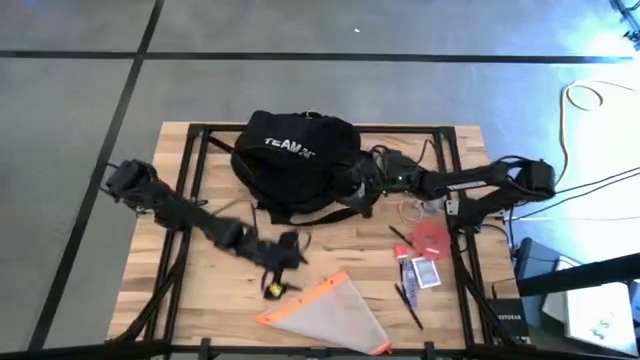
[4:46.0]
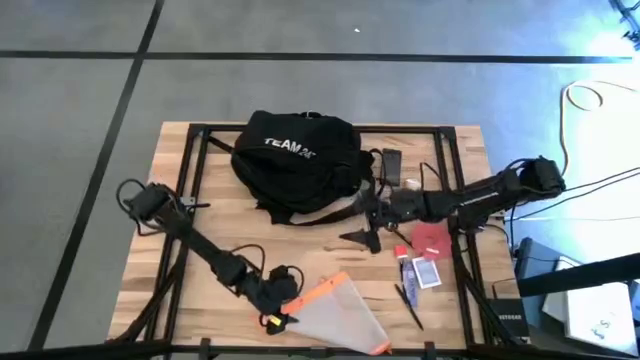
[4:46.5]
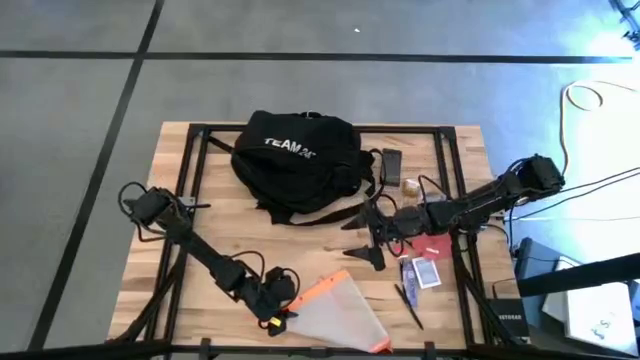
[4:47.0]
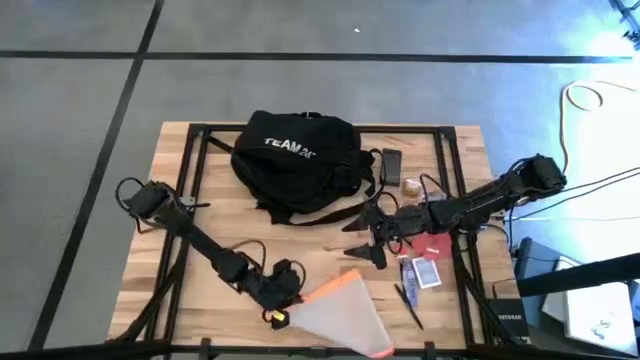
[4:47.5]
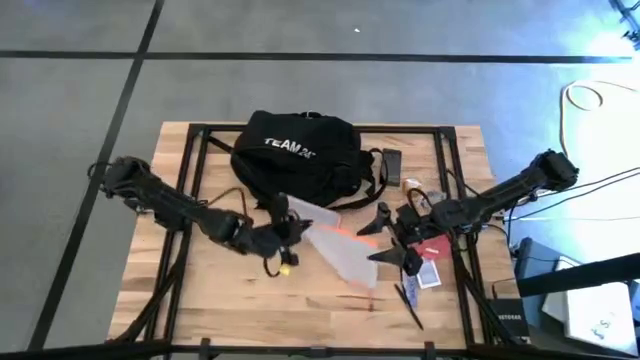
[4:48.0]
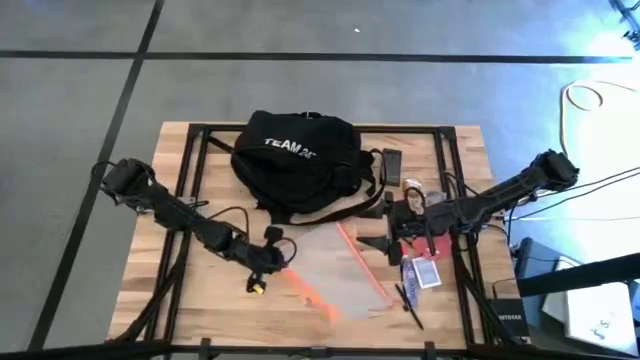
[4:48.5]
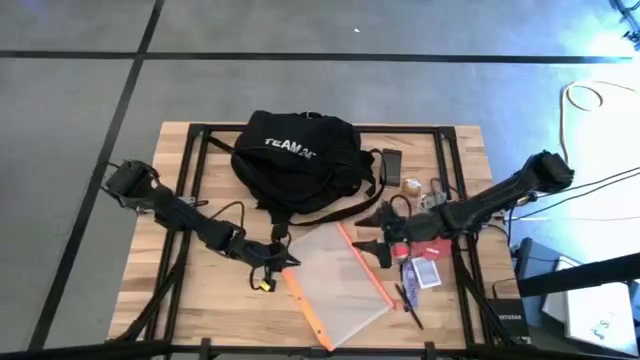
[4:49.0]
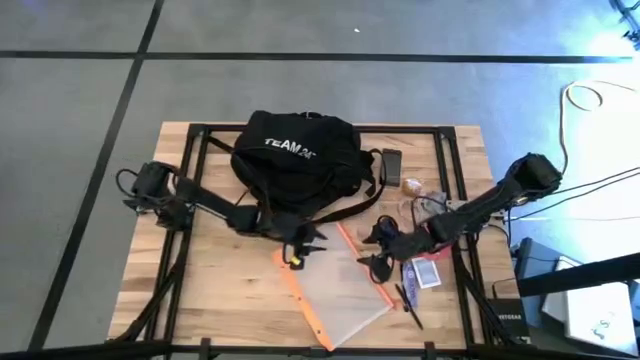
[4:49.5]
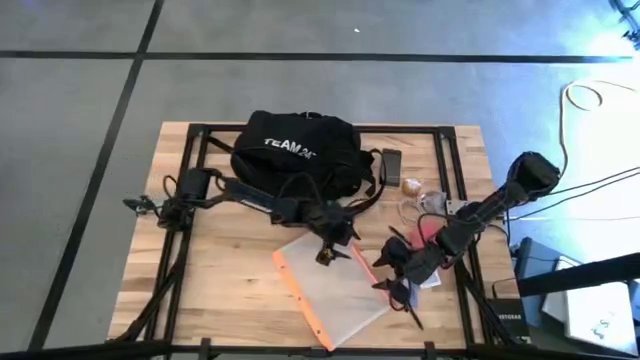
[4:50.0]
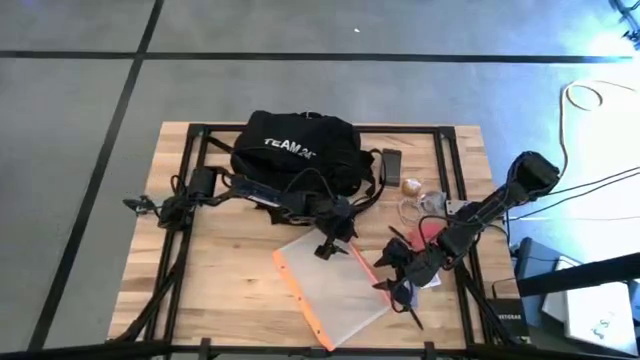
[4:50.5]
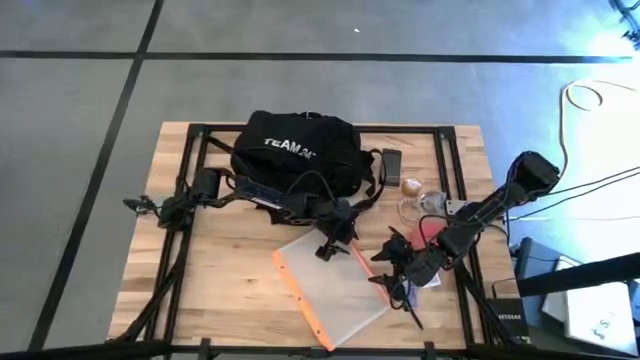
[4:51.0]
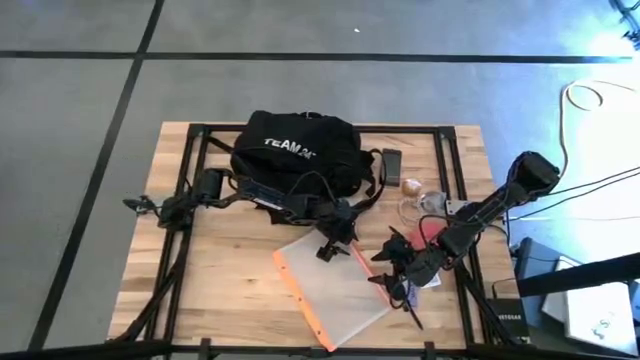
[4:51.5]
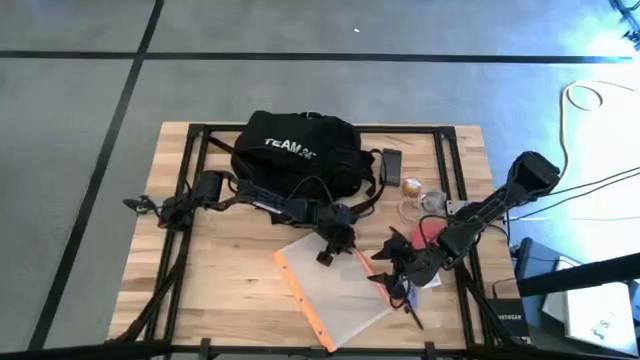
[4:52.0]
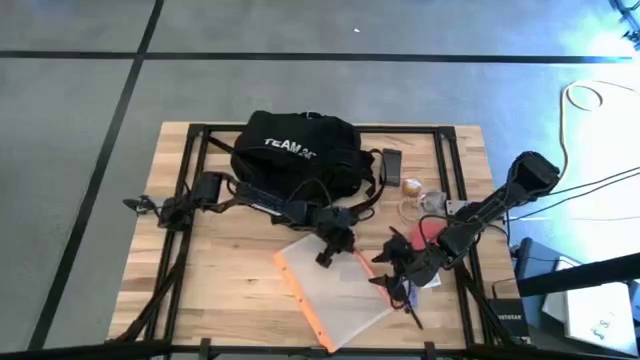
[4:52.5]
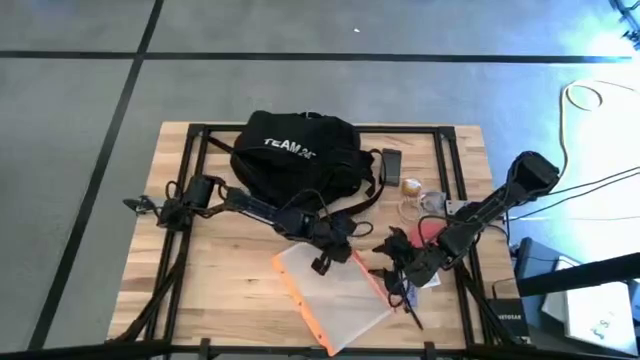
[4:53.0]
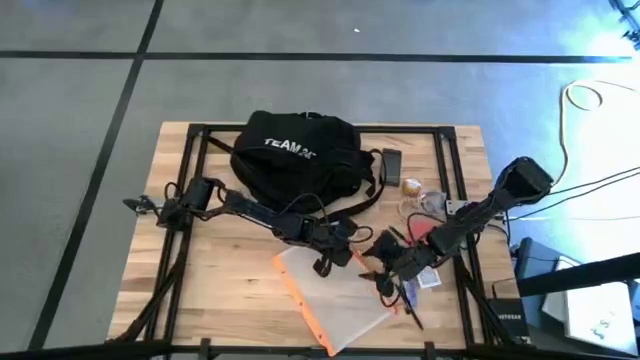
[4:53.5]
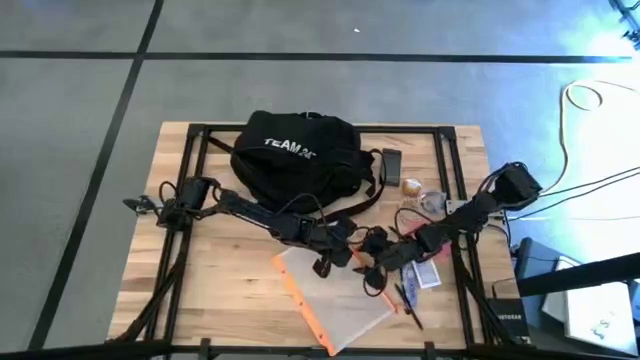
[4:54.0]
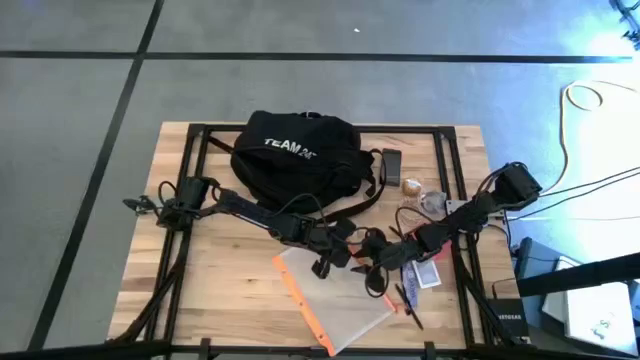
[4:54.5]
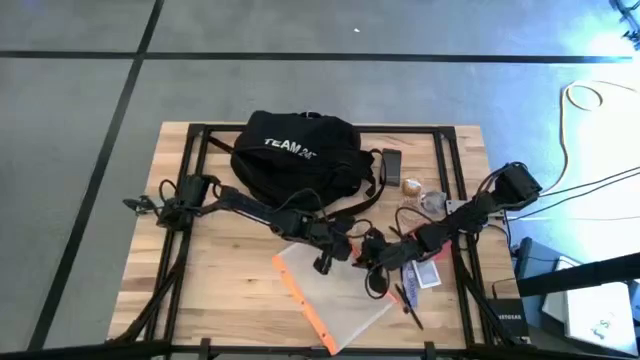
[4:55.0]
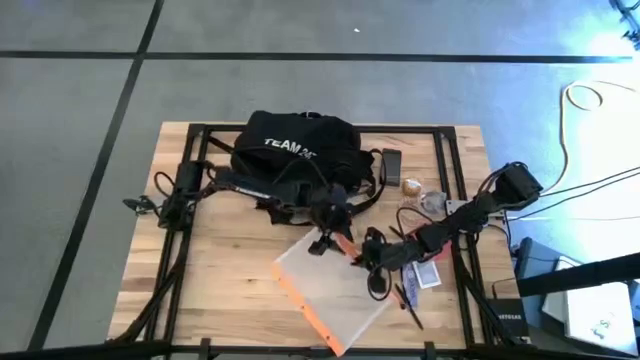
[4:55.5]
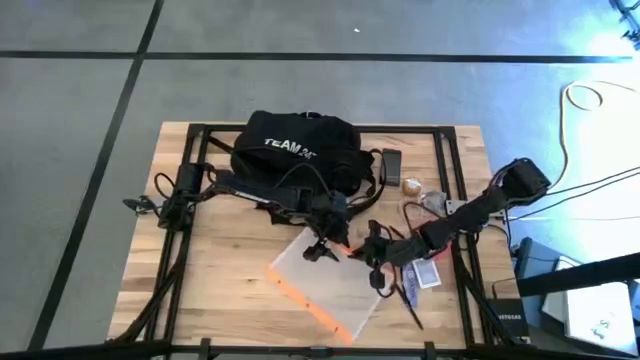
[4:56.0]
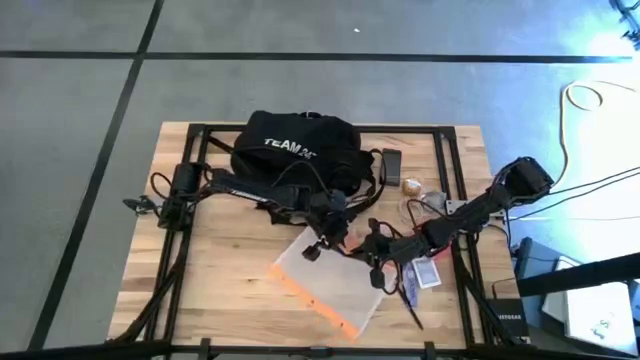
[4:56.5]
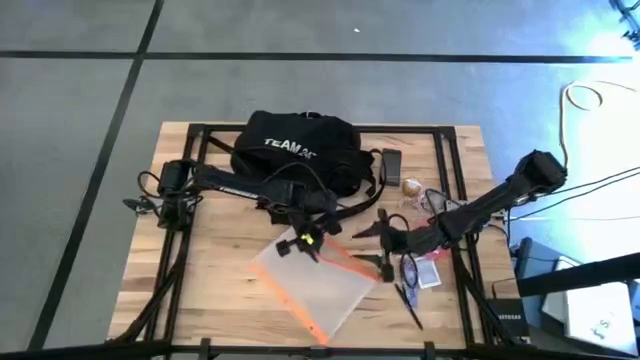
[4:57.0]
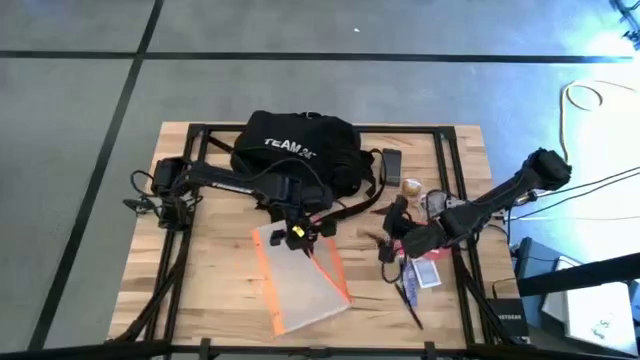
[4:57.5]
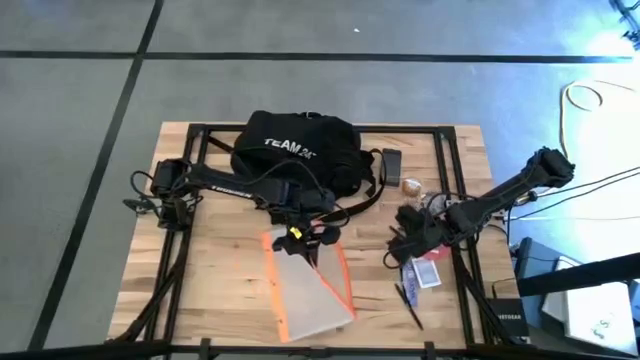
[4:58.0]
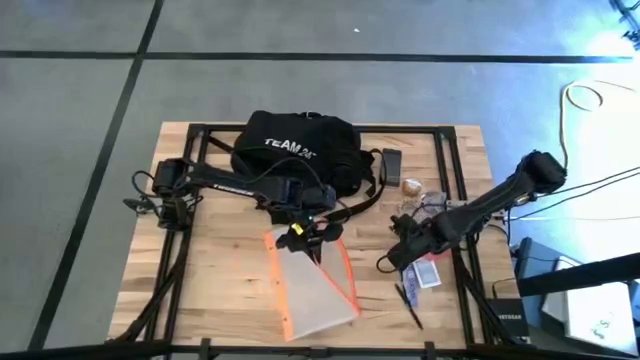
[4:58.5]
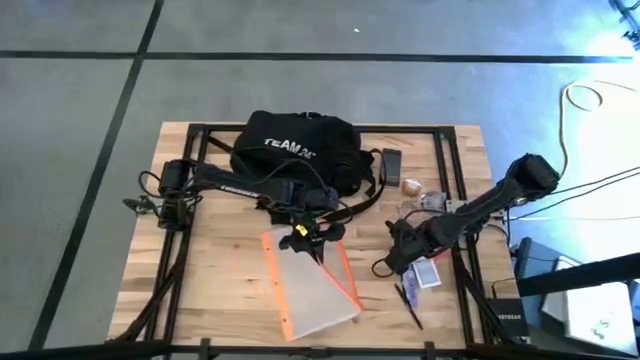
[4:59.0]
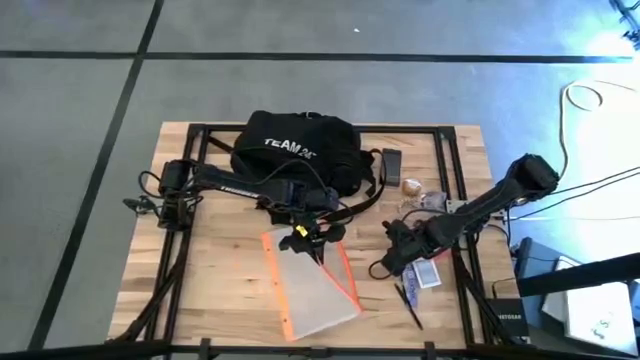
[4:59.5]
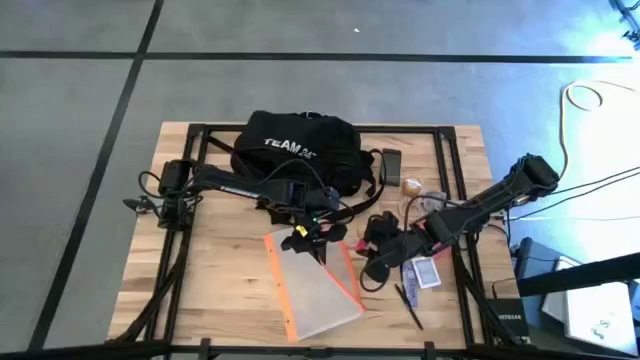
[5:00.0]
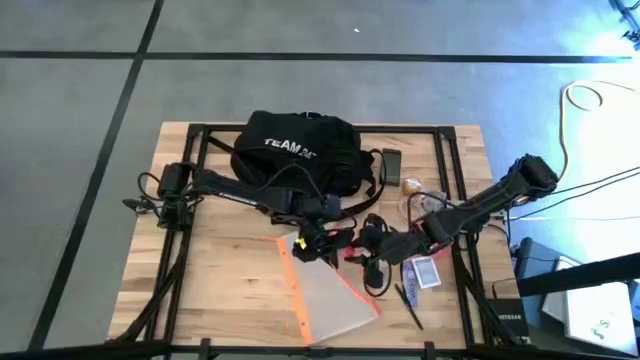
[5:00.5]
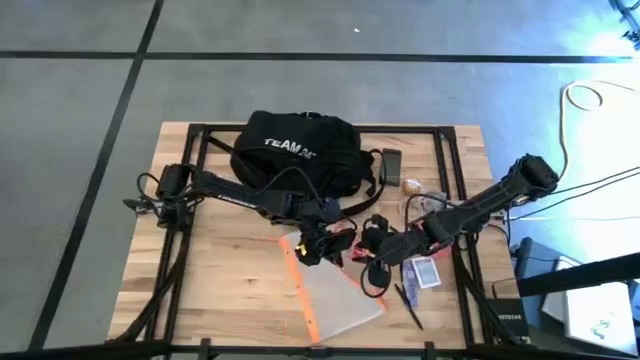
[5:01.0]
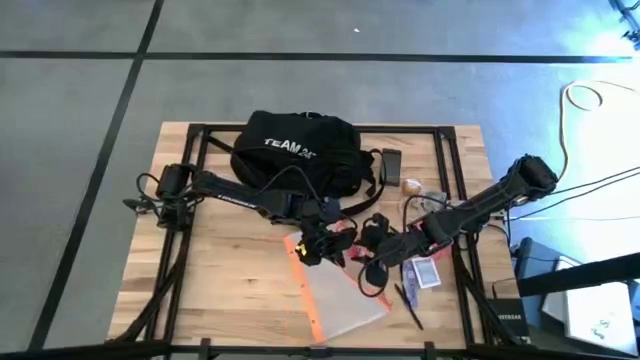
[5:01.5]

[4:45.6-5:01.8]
Task: Unpack backpack
Put the pink charger adapter into the white zip bag

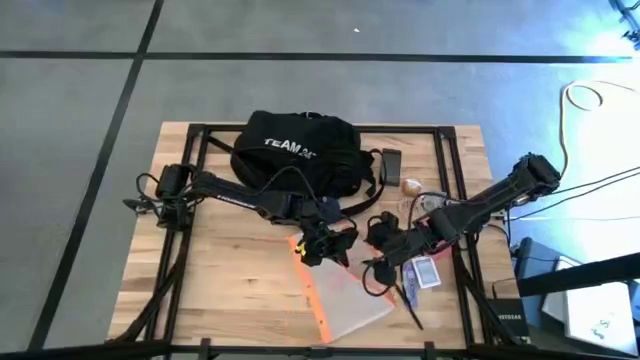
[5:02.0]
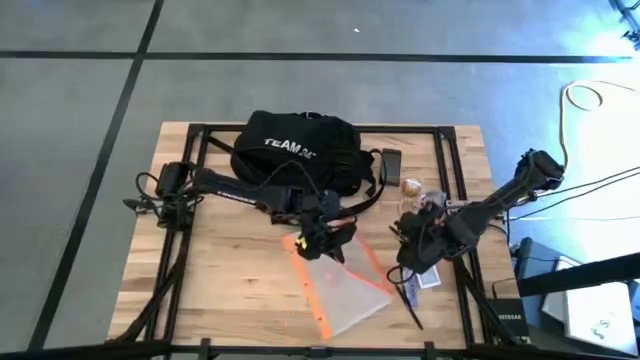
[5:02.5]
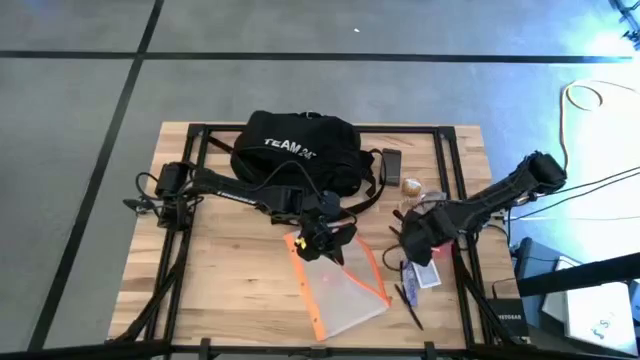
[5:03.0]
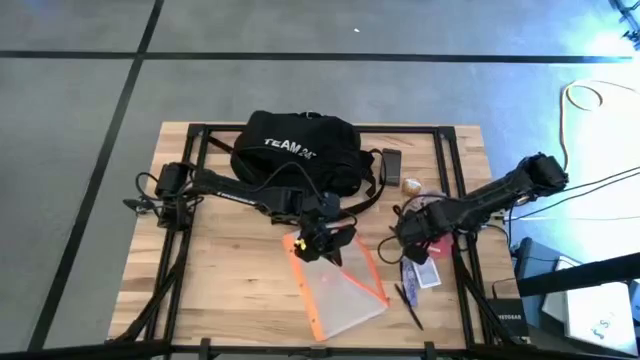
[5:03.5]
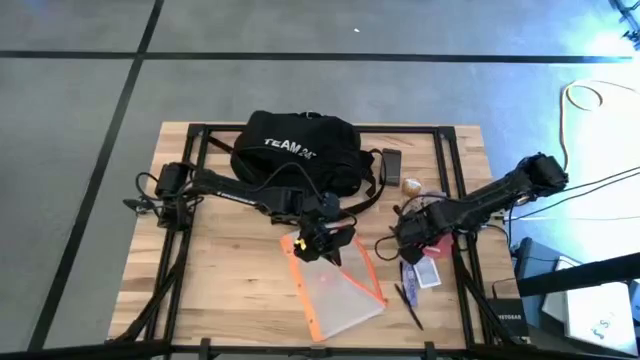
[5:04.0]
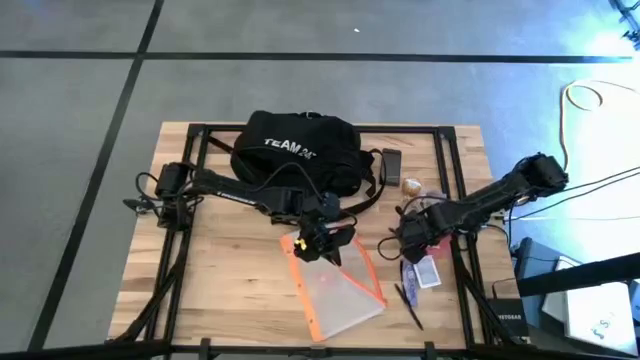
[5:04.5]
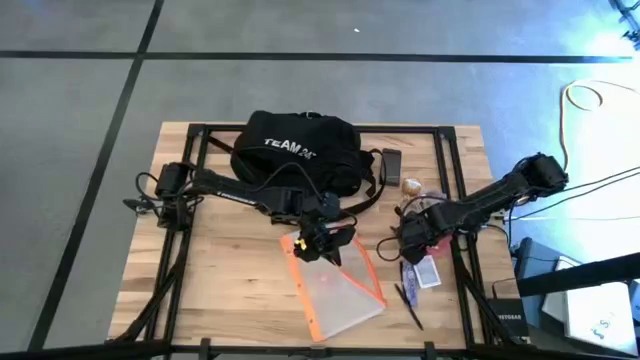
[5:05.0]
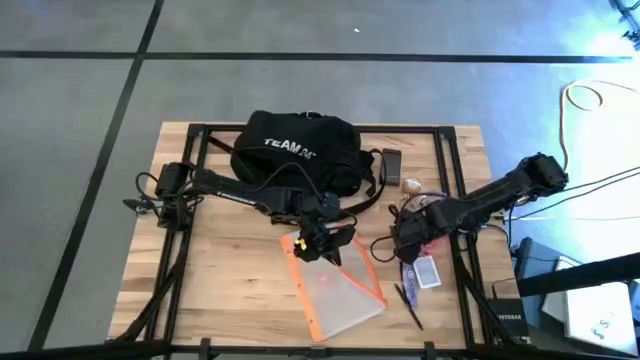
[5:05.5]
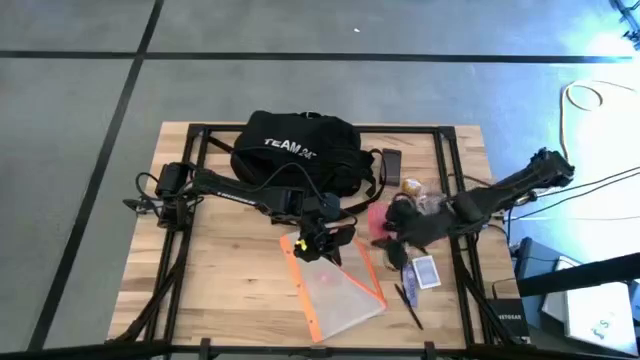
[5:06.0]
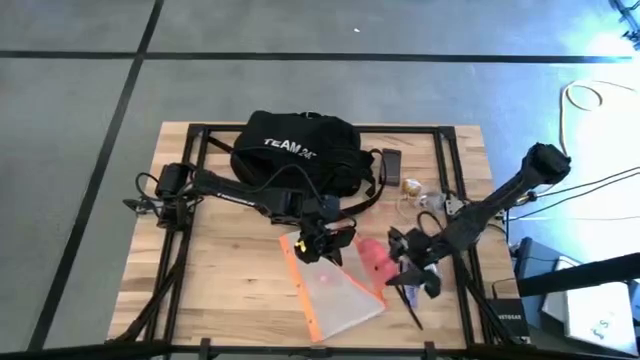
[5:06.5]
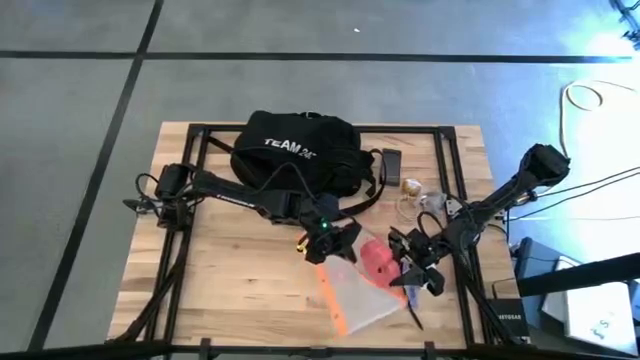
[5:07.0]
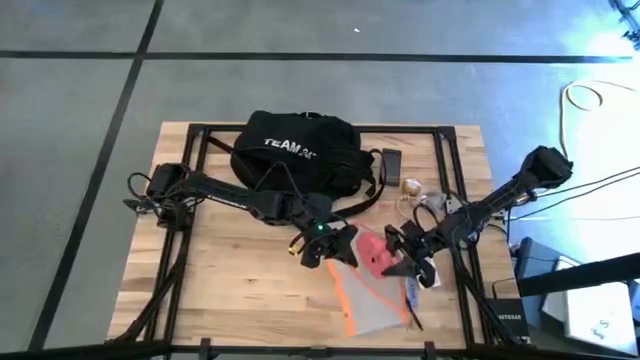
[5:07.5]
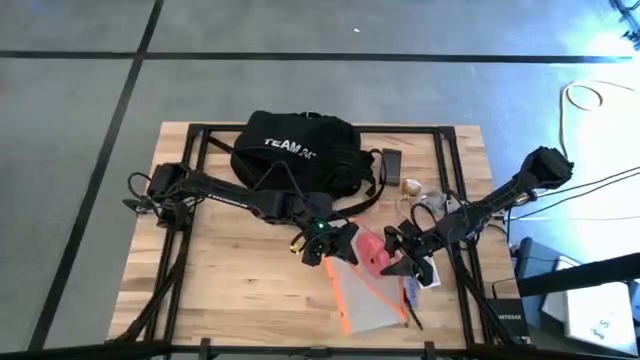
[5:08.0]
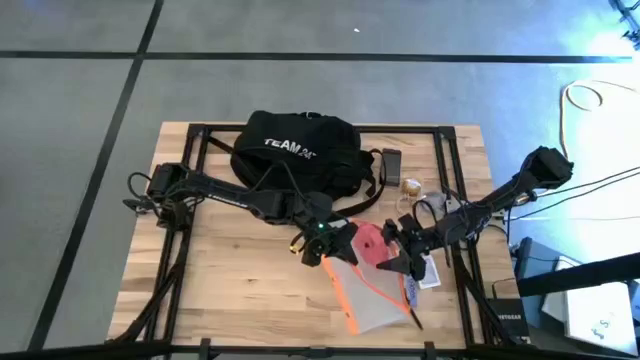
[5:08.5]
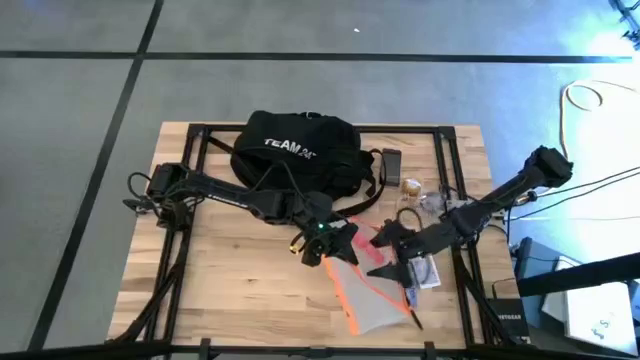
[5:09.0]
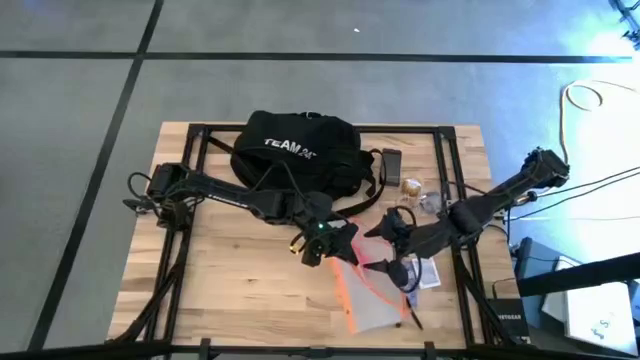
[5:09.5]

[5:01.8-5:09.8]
Put the medicine organizer into the white zip bag
